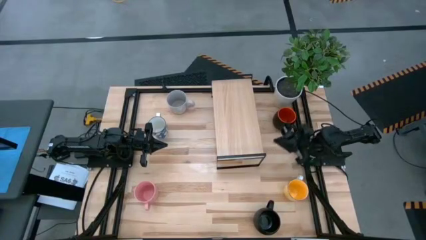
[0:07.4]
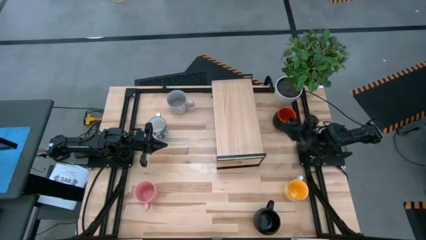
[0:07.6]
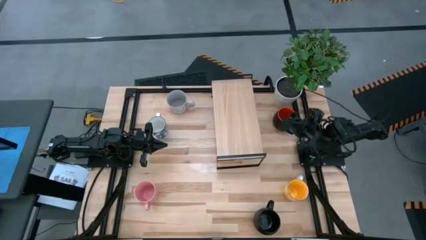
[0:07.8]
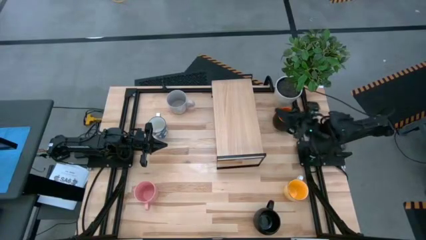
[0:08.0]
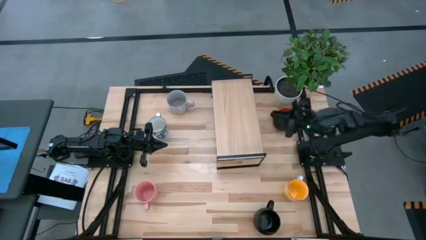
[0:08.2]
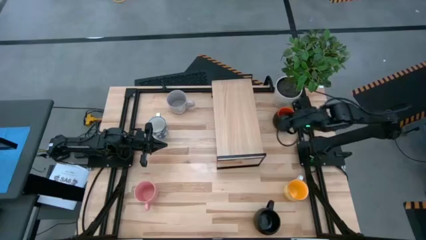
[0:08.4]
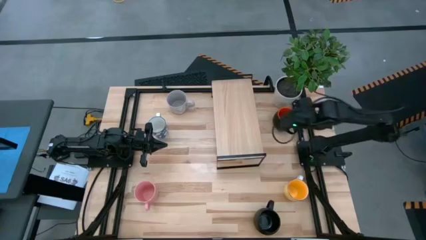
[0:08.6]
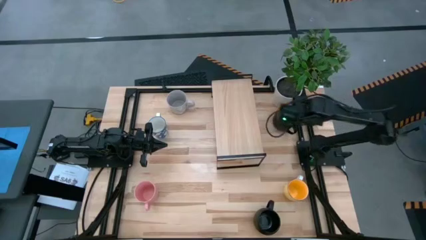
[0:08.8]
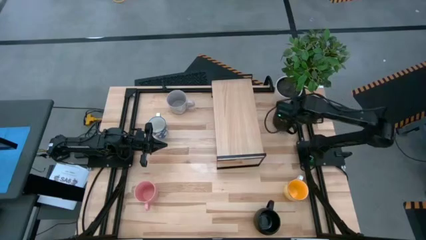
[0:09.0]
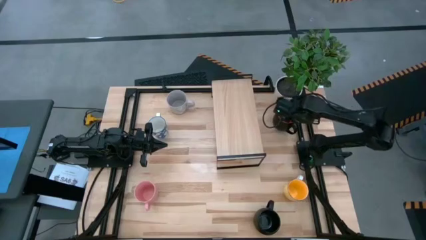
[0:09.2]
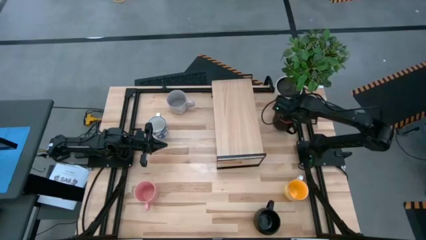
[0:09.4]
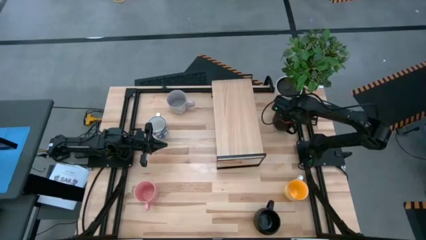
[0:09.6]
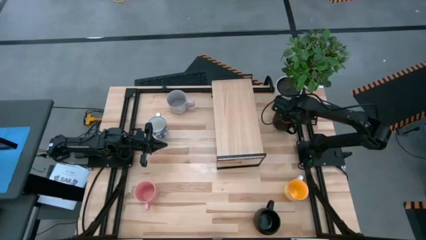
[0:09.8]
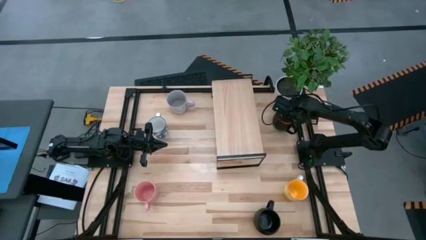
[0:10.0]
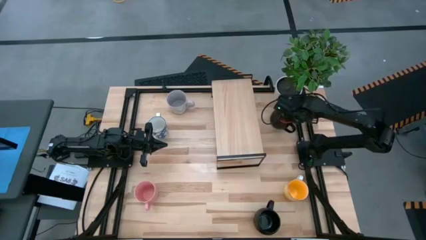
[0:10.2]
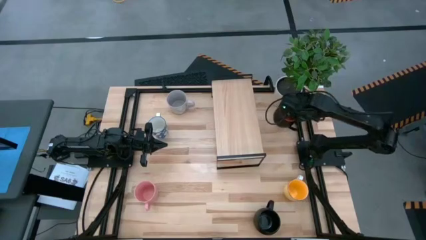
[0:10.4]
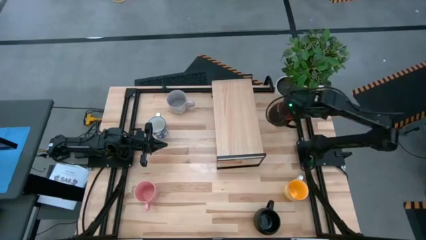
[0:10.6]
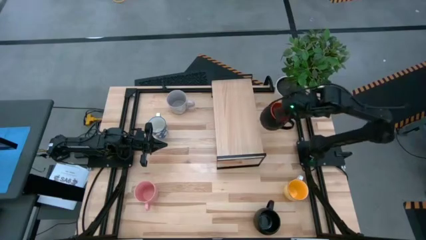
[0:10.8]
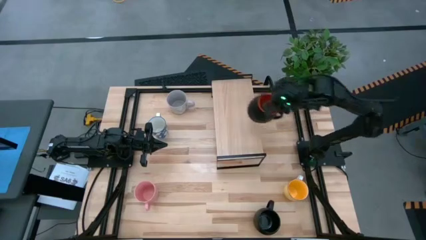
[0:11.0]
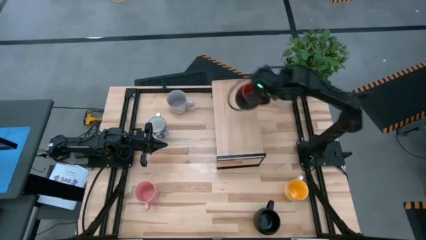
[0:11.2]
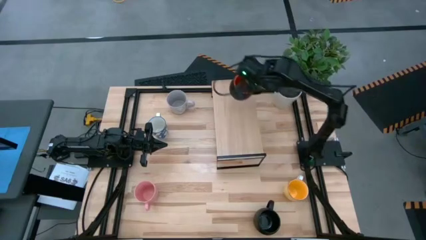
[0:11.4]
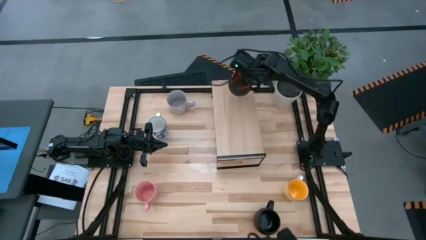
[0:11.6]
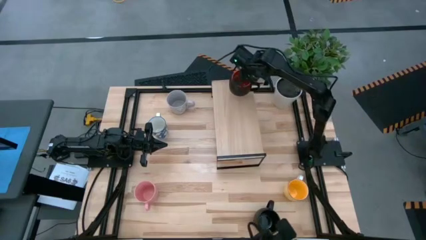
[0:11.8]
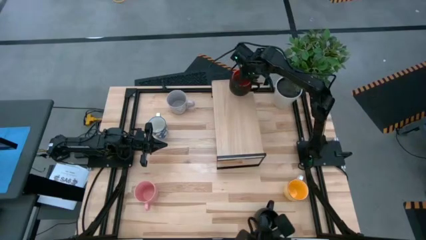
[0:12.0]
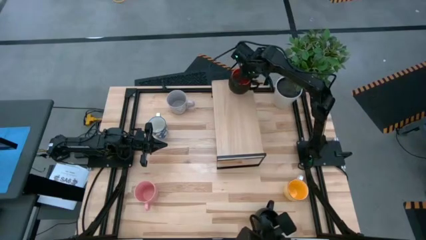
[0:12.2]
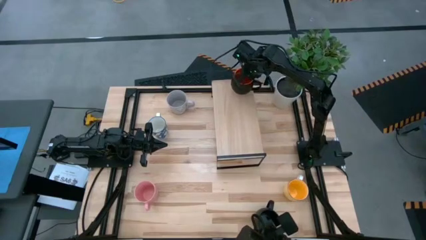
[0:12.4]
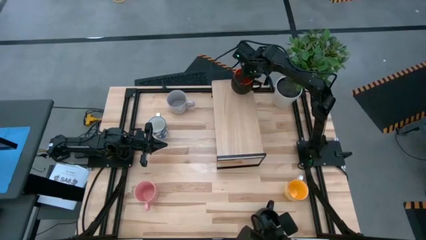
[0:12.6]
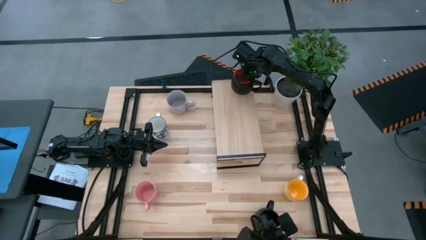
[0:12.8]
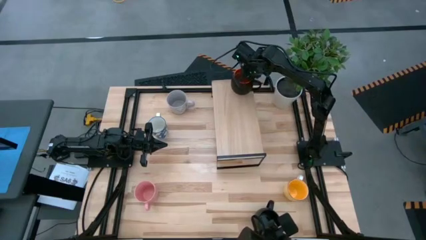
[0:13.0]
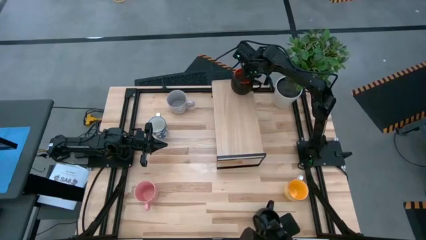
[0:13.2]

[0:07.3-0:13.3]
Task: Place coffee mugs
Put the orange mug on the shelf

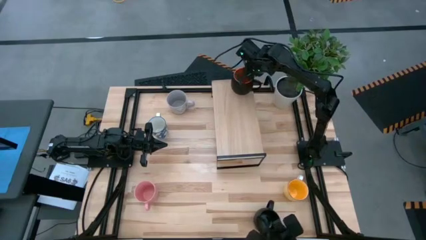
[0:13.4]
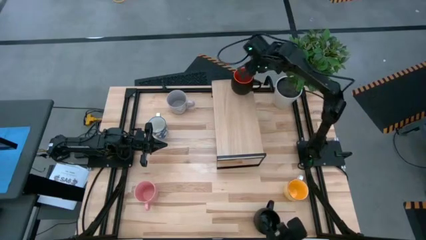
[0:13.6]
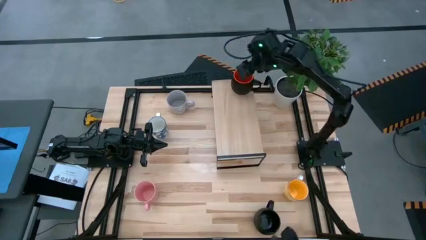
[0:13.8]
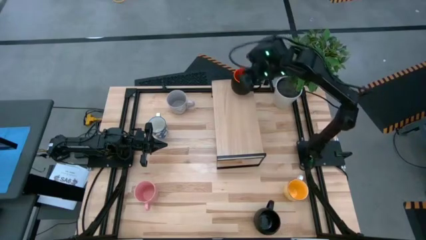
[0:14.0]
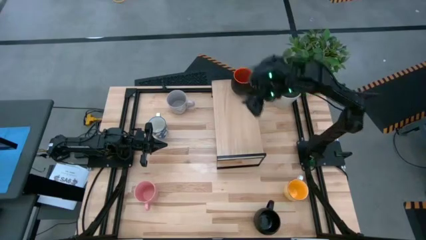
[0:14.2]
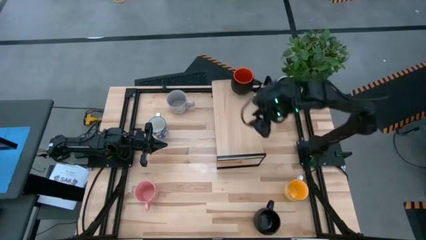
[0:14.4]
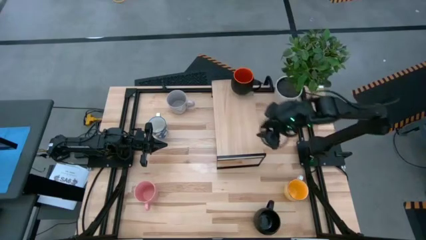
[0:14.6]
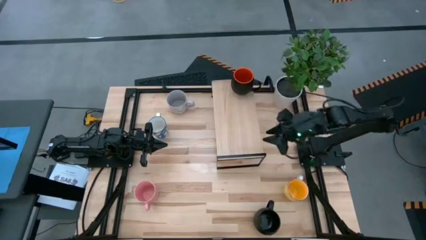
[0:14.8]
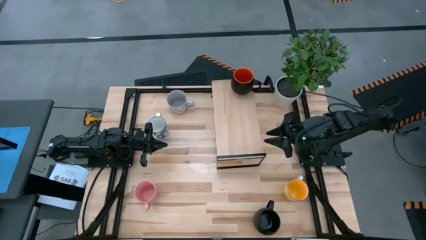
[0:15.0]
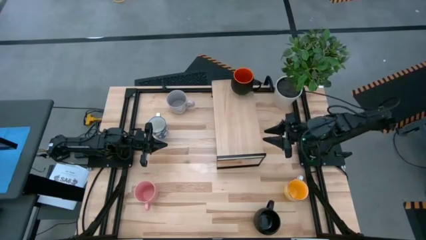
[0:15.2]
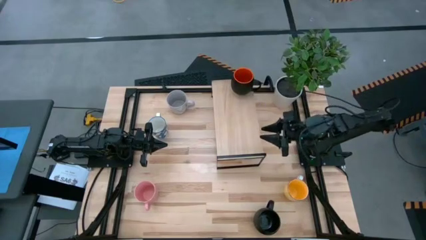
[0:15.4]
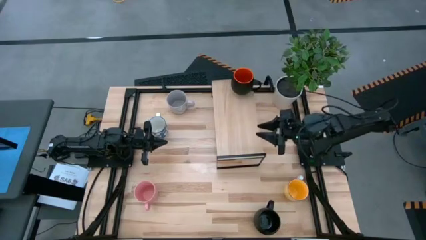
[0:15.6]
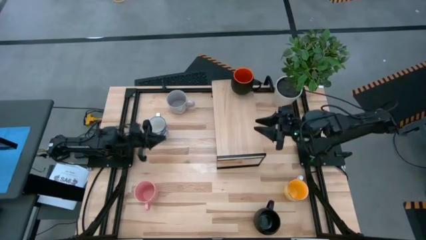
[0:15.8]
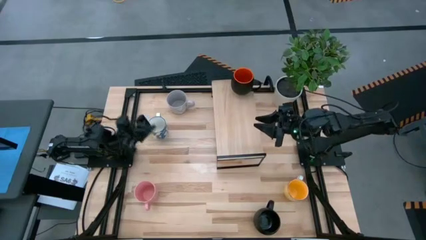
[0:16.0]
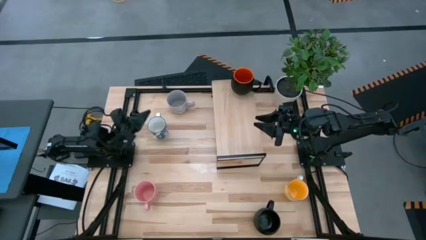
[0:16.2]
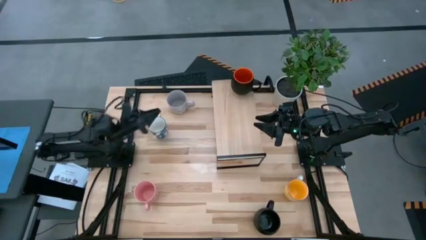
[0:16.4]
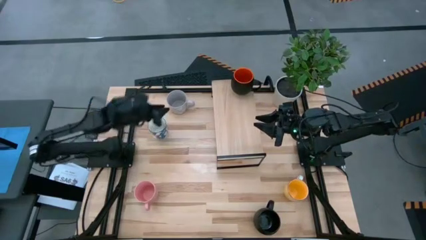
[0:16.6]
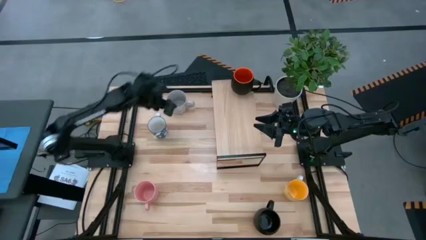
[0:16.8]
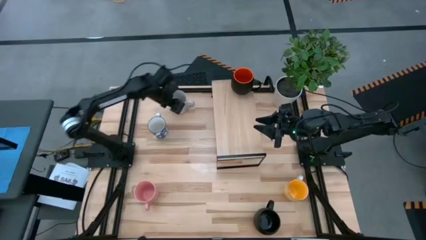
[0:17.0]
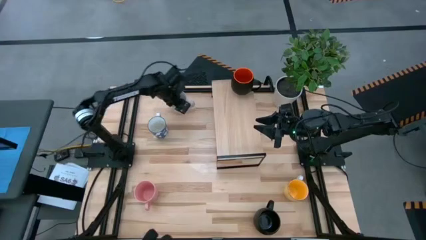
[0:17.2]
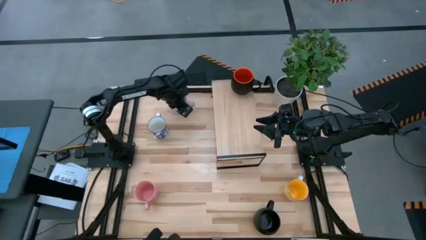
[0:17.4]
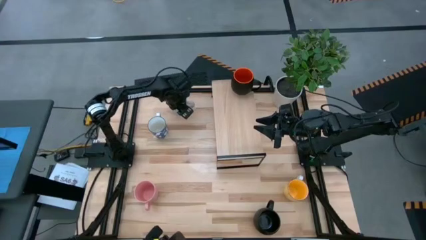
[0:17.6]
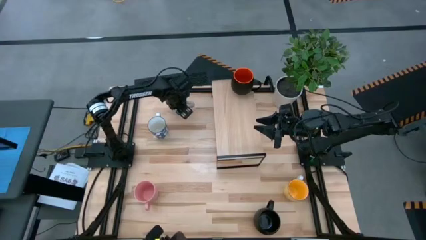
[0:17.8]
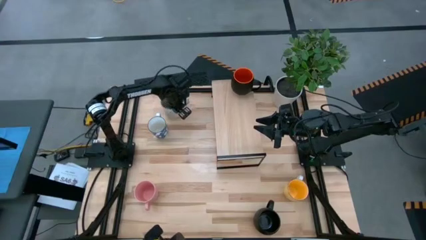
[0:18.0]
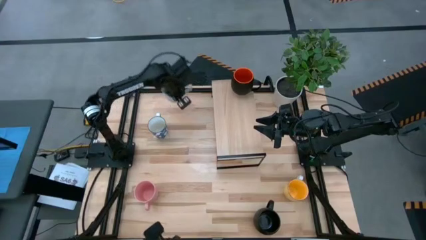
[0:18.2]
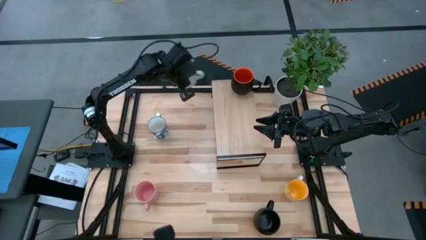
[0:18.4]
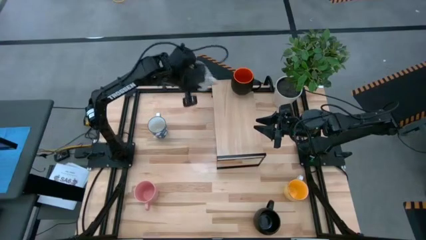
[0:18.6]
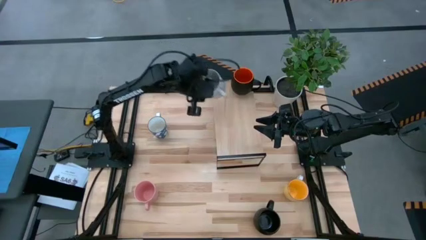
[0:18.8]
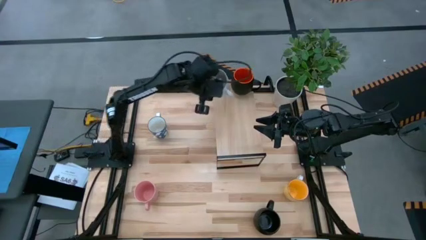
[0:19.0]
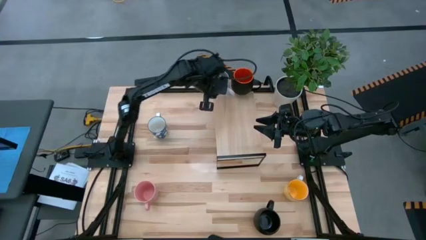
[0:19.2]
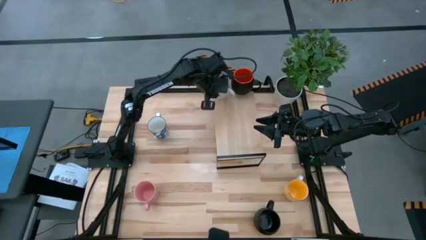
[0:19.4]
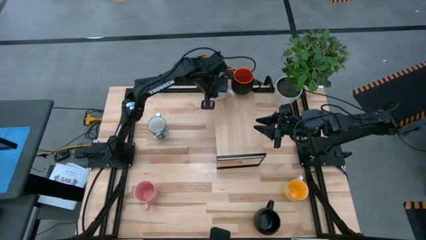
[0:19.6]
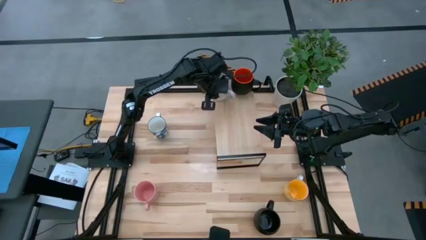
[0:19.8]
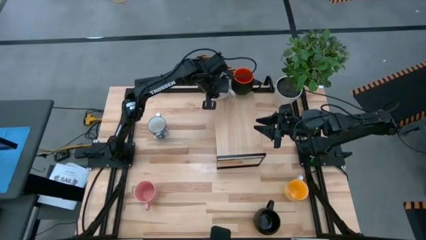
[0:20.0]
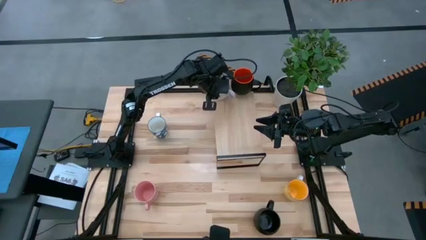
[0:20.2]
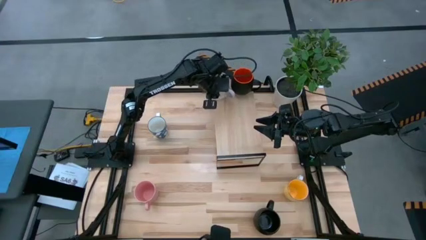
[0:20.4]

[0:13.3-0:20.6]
Put the gray mug on the shelf

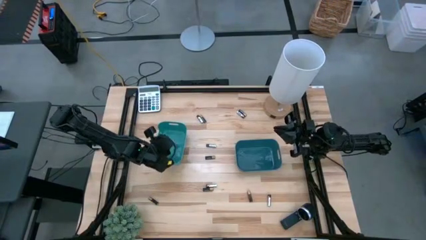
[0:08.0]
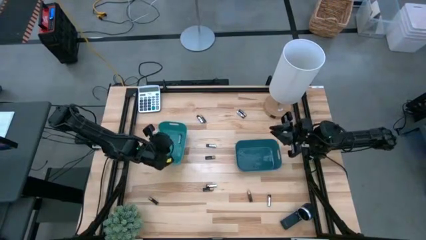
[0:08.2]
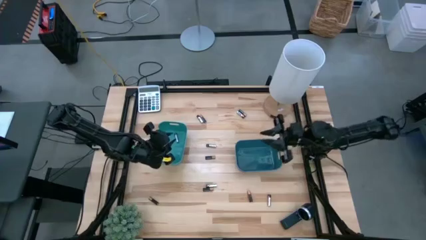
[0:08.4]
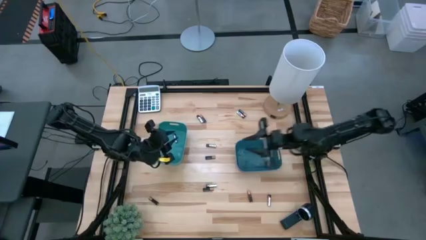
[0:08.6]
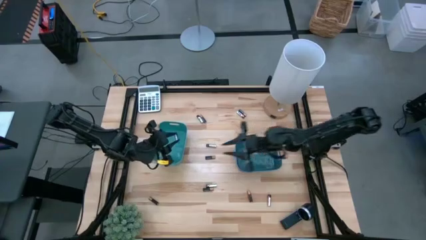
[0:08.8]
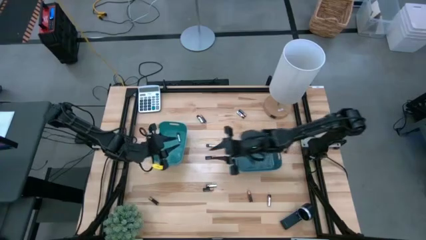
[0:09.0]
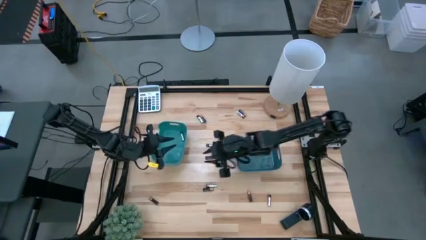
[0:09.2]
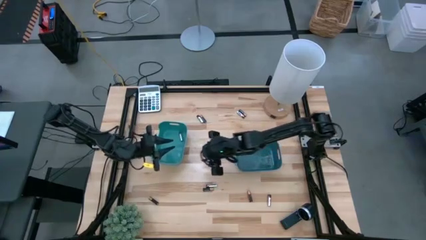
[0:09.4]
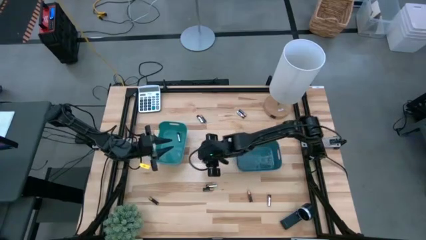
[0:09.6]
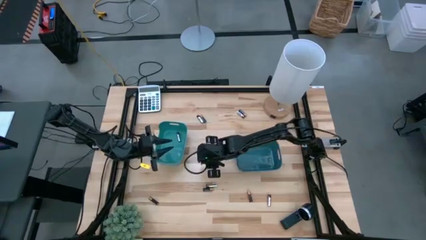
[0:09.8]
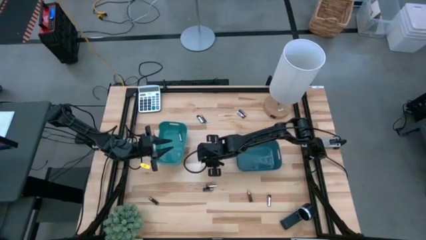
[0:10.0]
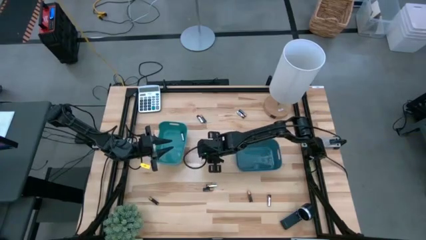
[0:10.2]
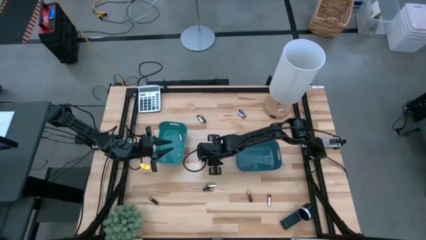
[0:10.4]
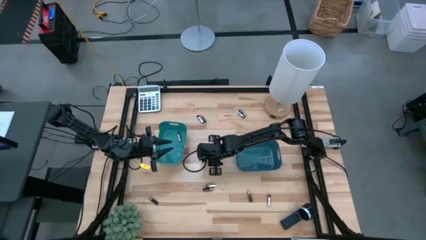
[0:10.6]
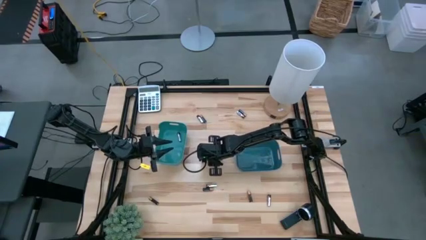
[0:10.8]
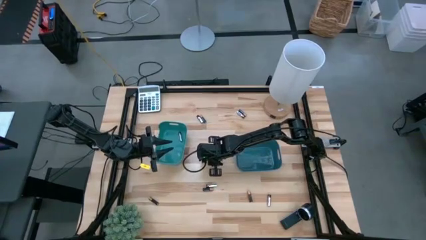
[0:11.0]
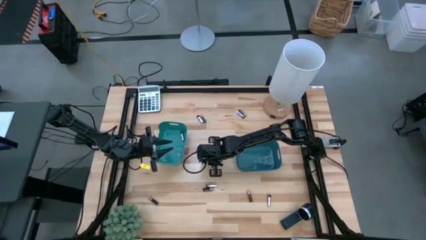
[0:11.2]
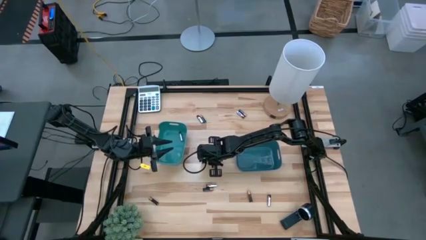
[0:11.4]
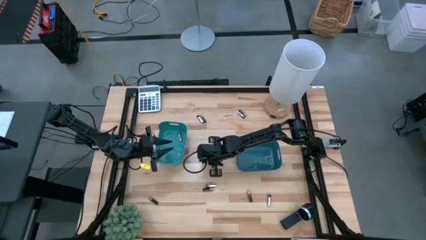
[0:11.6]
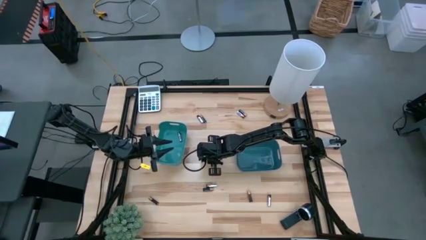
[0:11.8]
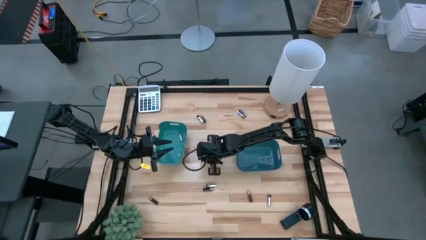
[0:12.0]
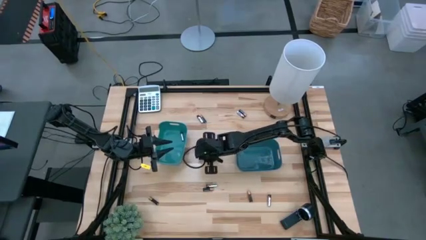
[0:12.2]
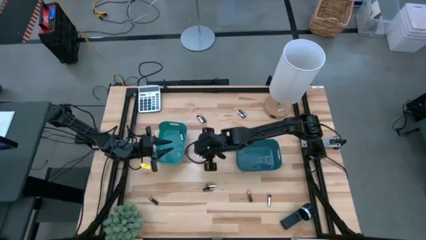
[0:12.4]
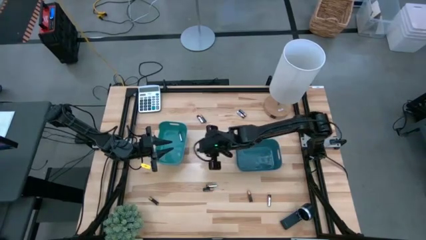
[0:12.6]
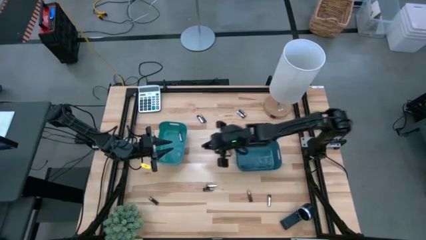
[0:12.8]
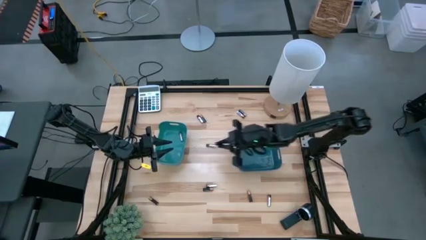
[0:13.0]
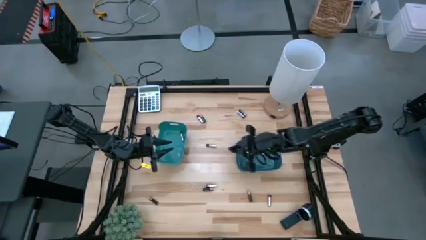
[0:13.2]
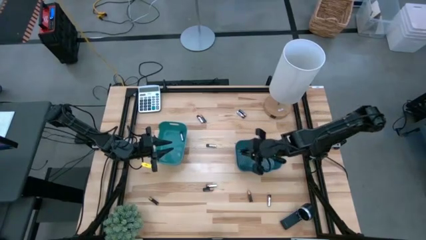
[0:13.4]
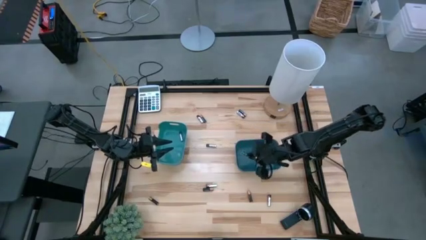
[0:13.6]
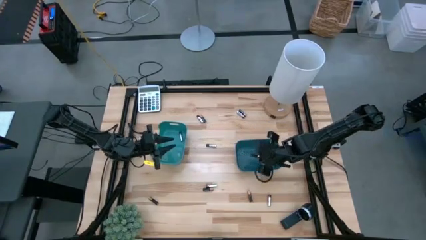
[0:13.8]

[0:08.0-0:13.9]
Task: Sort batteries
Put the black battery into the dark blue bin
